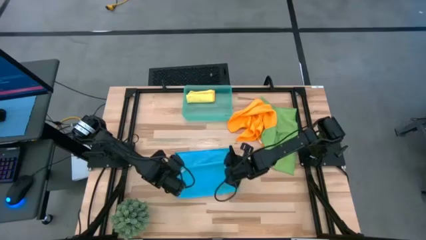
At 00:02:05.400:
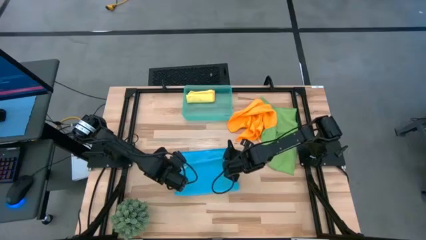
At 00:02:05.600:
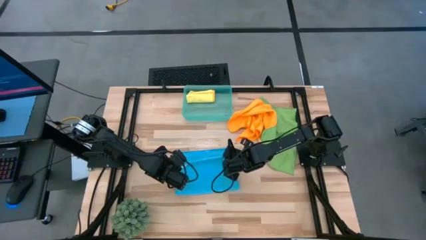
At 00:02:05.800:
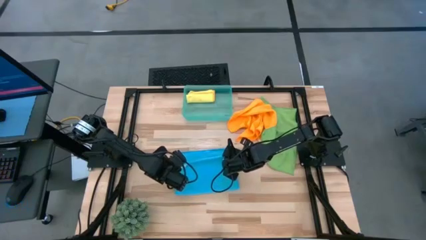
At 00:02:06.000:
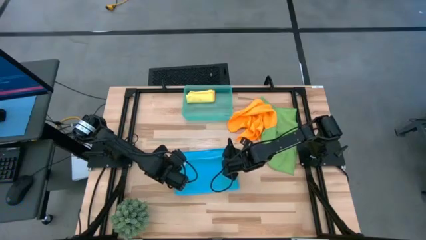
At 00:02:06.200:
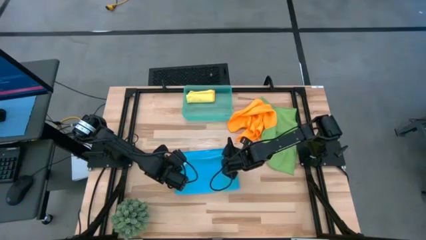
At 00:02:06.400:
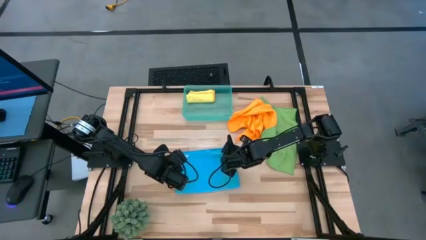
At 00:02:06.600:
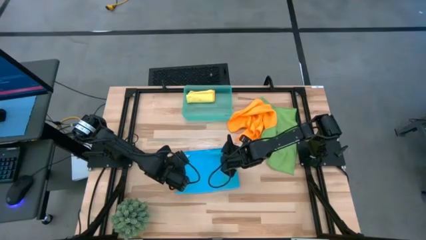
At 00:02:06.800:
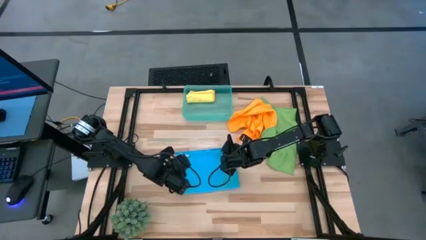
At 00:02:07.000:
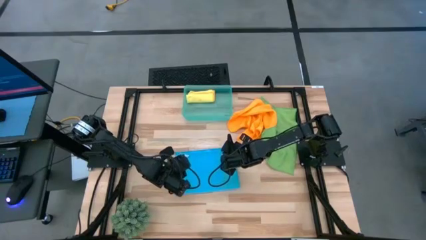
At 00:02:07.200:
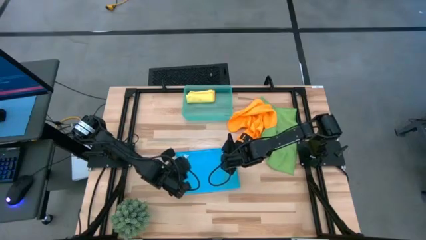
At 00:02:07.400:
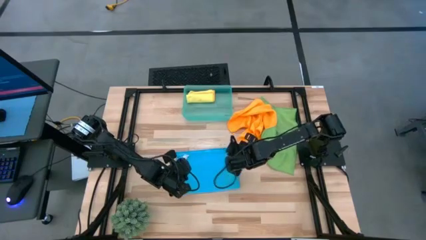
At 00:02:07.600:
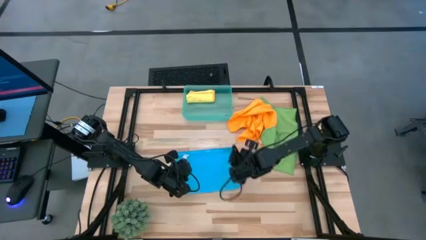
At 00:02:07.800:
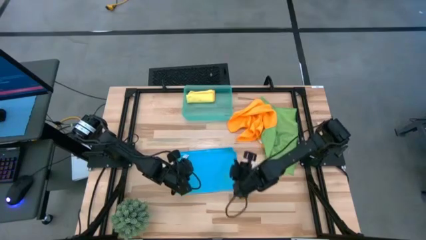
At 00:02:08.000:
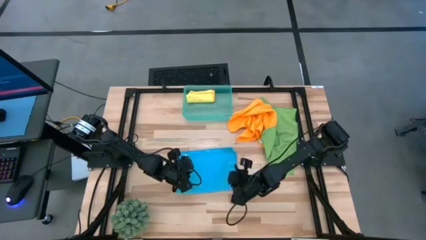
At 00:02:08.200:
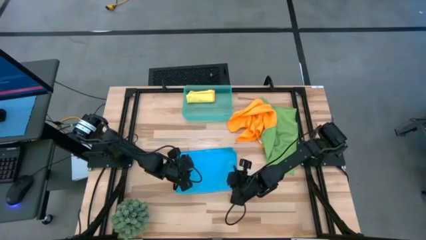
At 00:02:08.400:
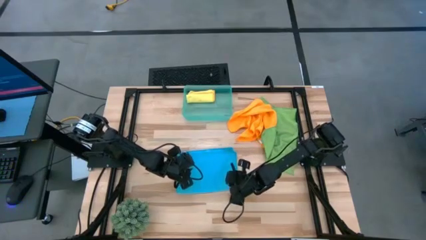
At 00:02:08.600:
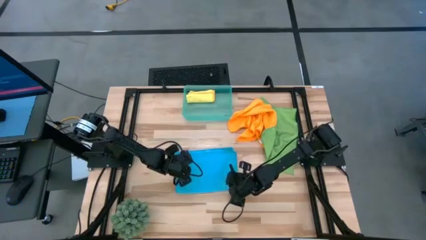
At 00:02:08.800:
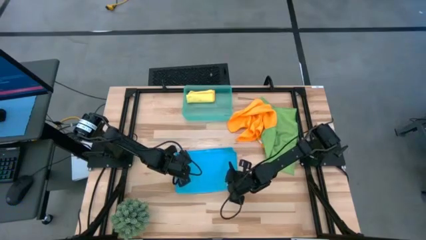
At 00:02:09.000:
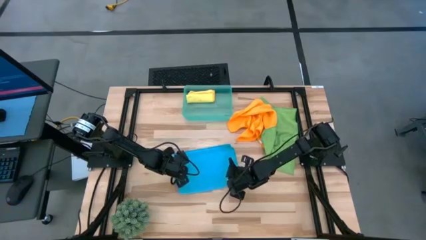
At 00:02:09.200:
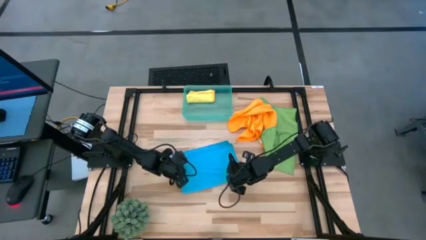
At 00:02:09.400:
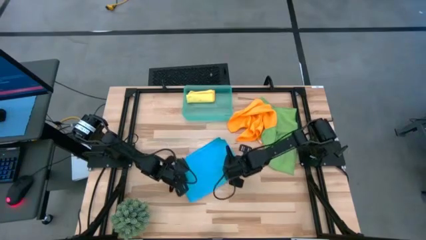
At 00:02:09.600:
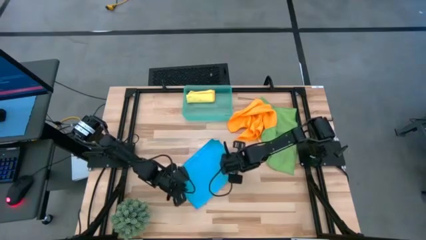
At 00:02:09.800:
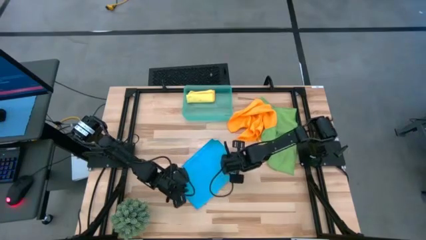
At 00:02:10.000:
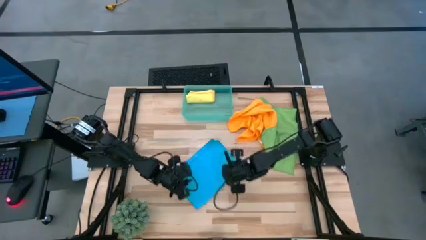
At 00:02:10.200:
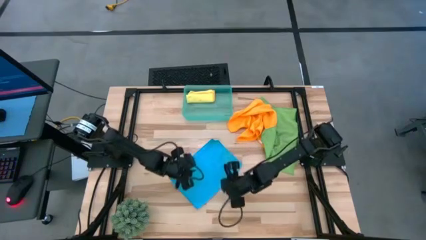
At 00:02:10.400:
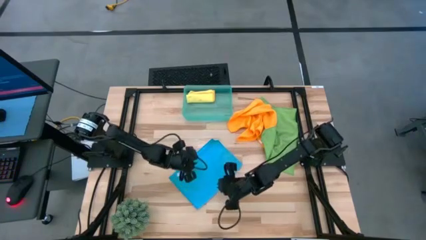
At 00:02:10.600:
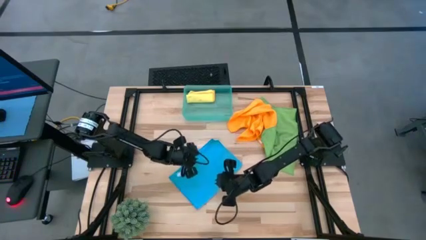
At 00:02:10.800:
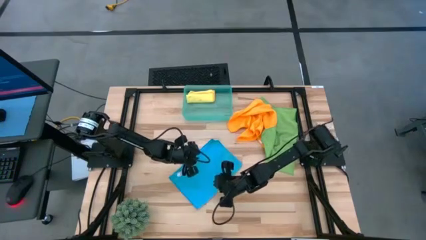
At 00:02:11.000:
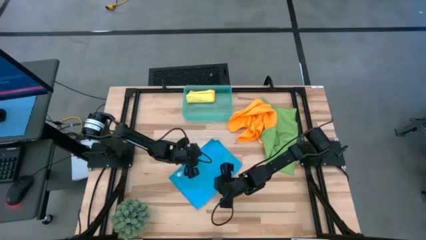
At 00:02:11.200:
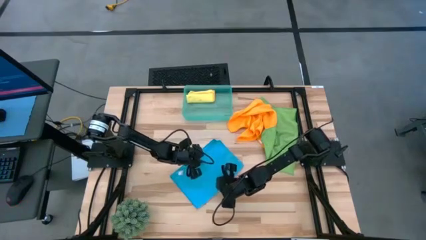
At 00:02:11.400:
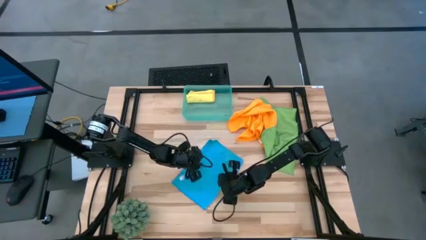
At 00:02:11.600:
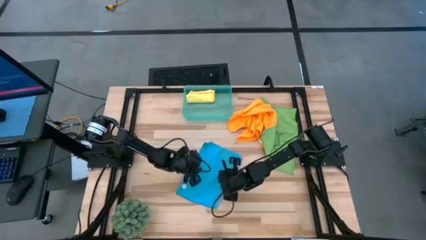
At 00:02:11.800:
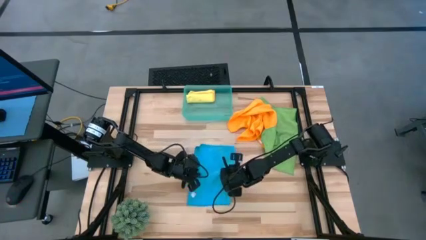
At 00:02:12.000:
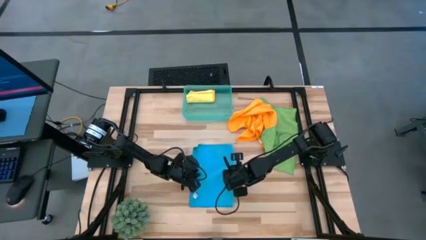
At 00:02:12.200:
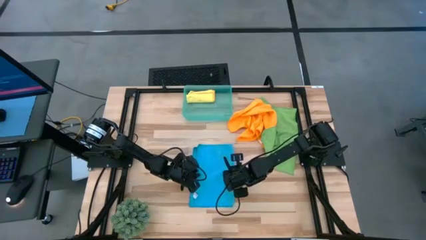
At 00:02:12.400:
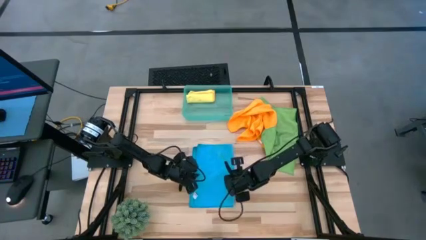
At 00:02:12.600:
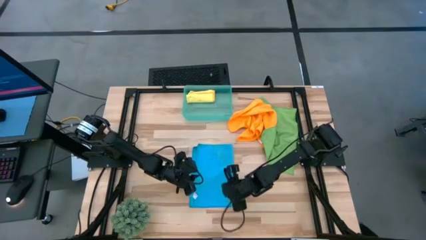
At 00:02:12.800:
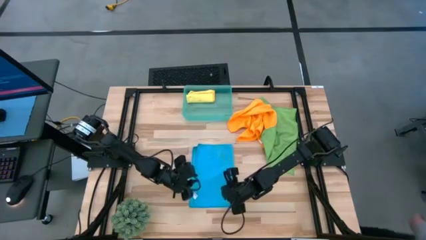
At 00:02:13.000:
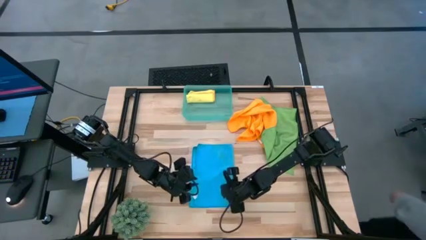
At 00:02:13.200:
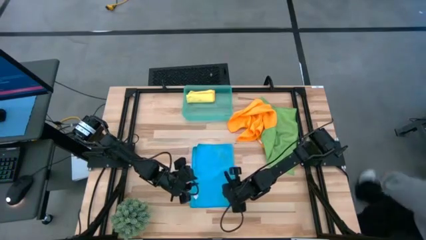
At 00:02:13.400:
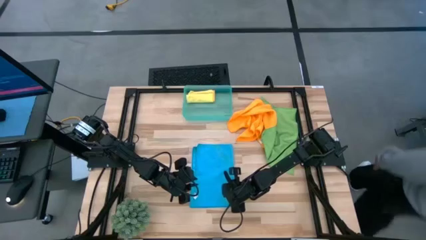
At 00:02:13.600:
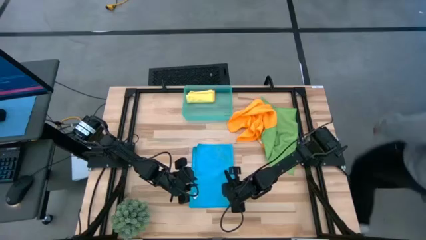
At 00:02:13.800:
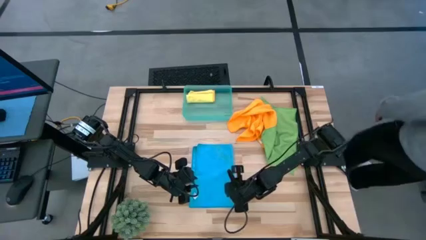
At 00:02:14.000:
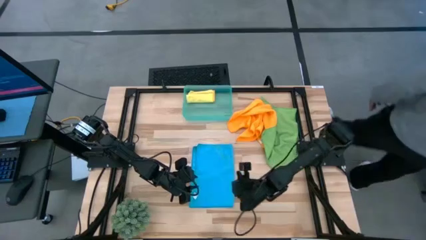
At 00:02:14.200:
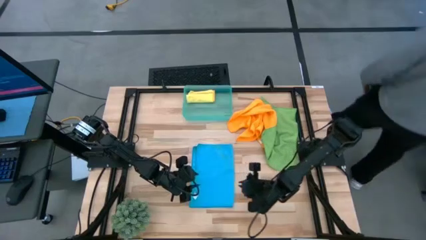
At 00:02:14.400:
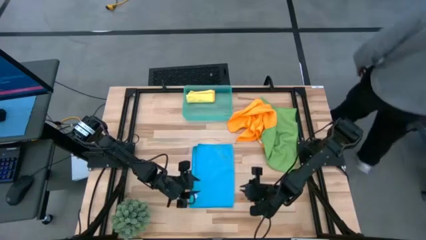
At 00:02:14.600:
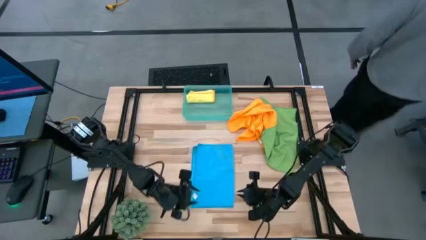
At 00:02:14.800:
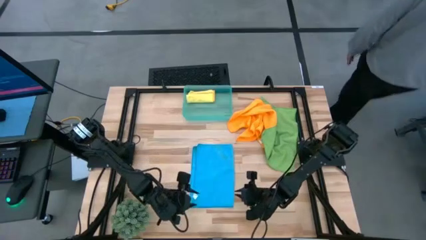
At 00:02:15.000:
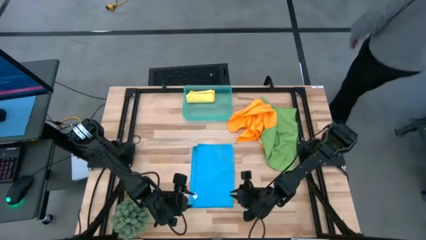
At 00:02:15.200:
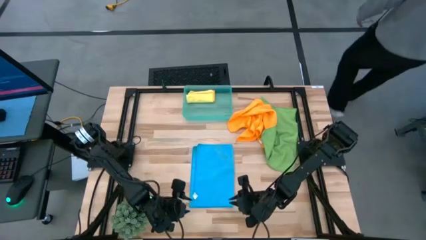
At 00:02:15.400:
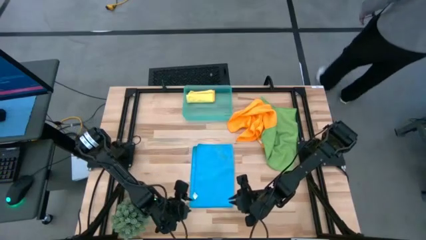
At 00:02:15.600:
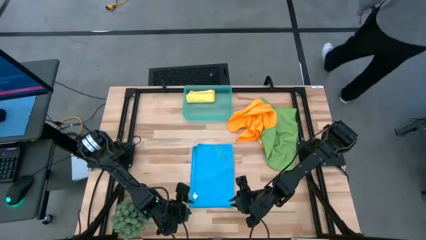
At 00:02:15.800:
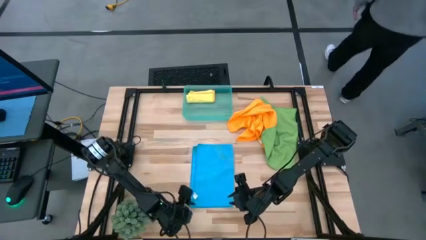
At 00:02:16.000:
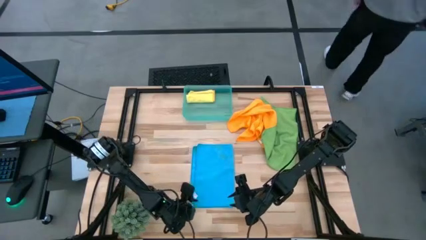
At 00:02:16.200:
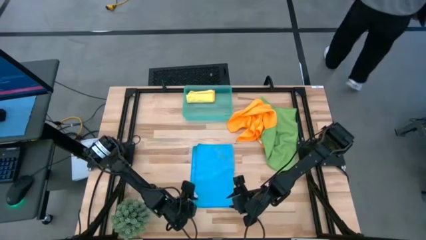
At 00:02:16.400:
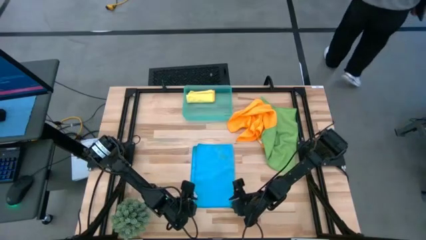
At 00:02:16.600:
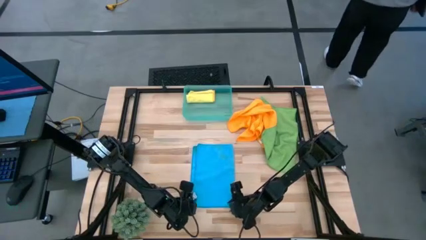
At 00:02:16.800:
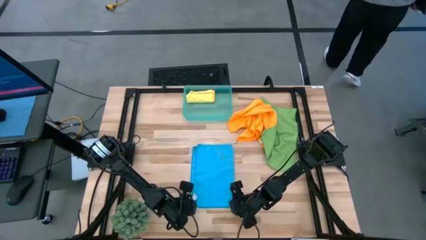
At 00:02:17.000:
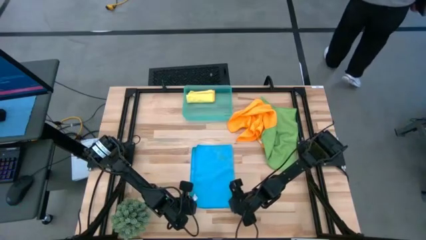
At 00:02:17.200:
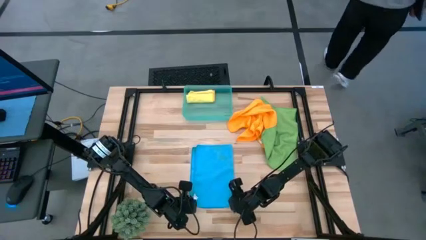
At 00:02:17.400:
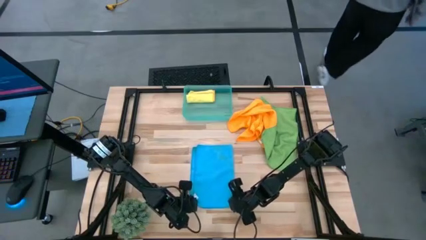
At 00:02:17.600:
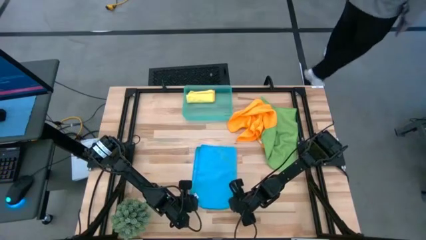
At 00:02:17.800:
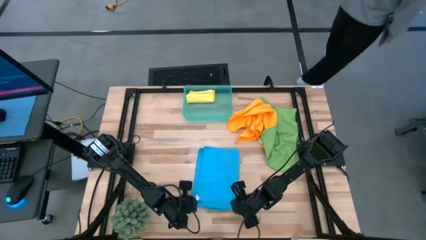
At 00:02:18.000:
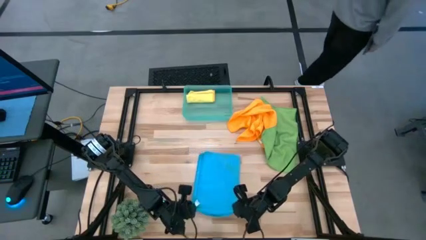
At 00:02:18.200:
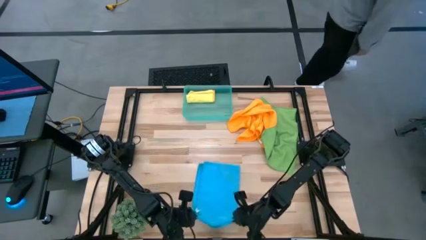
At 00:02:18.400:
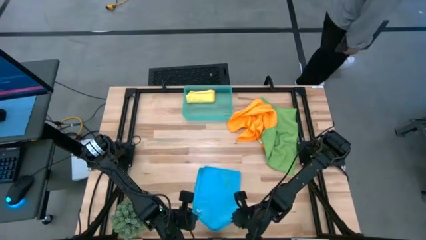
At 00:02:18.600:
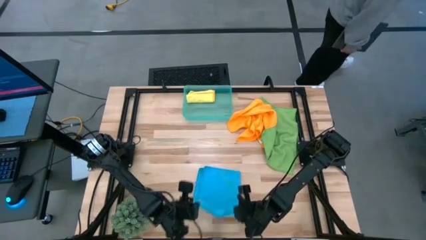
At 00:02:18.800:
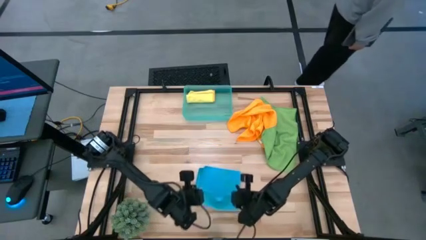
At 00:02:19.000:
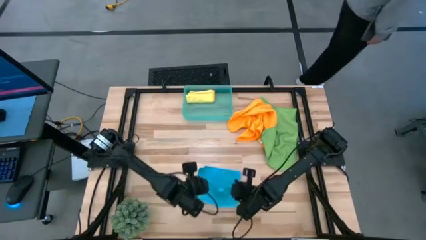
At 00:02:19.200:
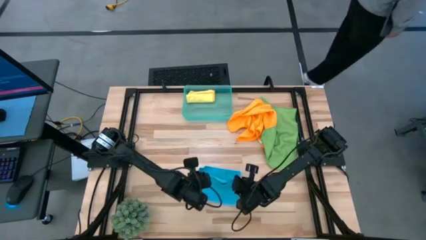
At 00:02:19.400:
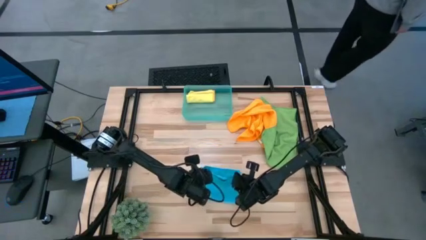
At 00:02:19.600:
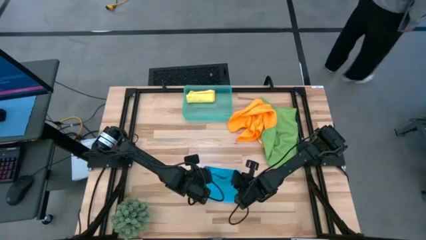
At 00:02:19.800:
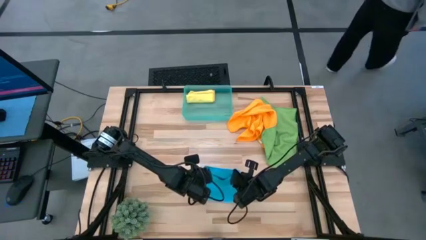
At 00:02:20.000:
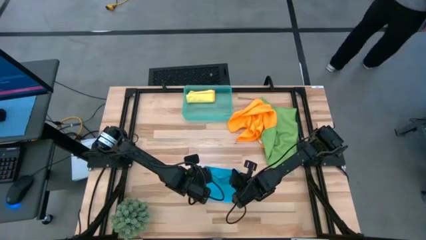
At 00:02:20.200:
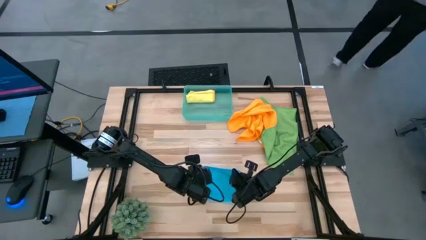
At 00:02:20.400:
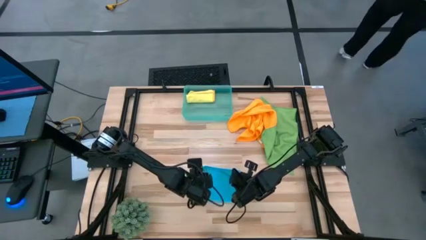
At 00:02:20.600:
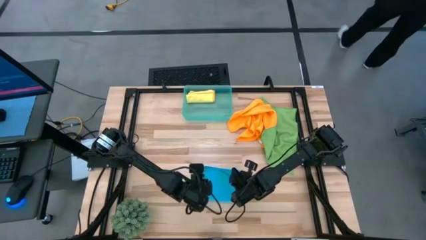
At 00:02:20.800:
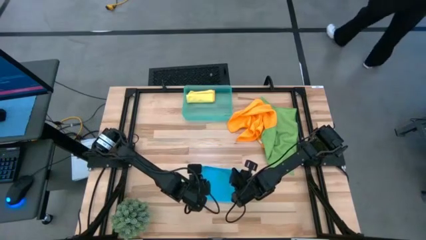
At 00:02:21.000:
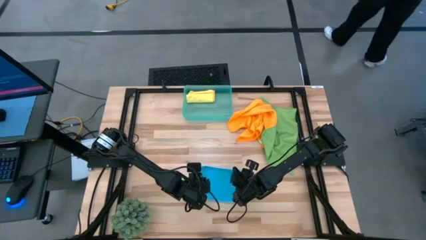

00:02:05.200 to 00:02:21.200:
Task: Roll microfiber towels into tight, uniform cylinder then place into a basket
Fold the blue microfiber towel
